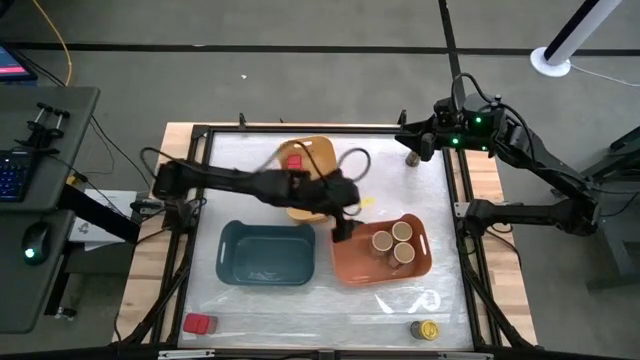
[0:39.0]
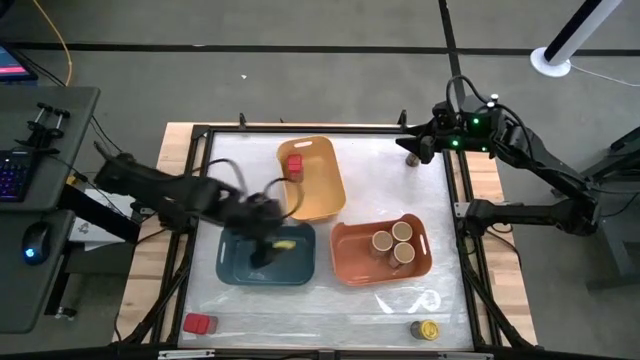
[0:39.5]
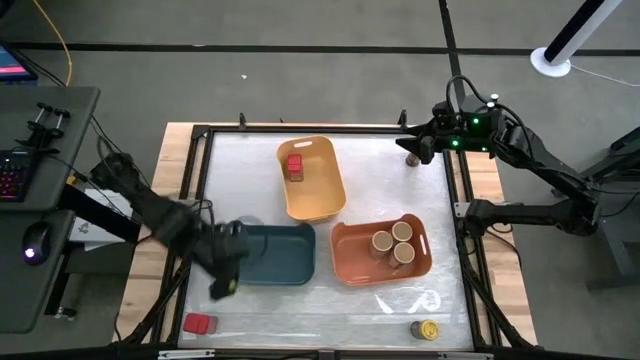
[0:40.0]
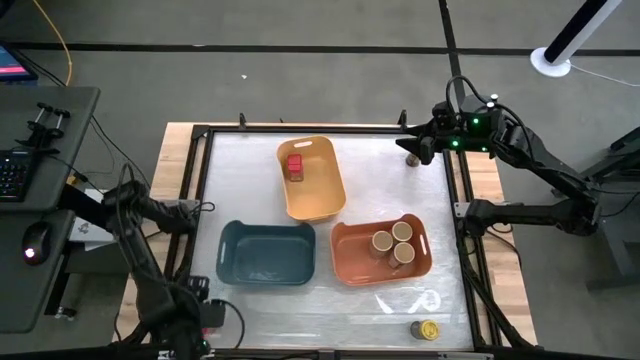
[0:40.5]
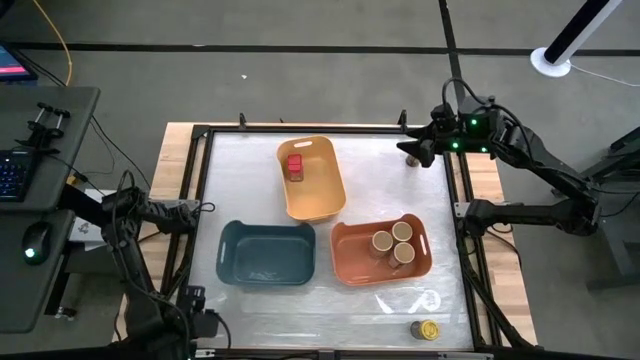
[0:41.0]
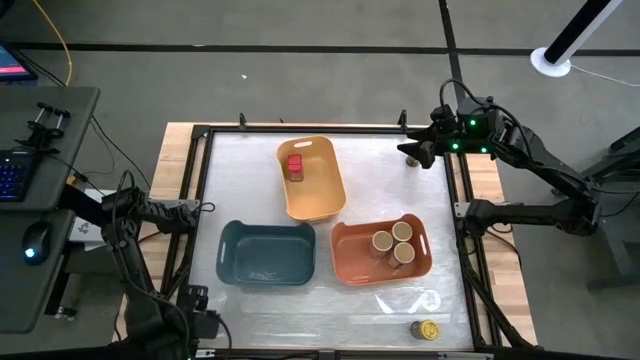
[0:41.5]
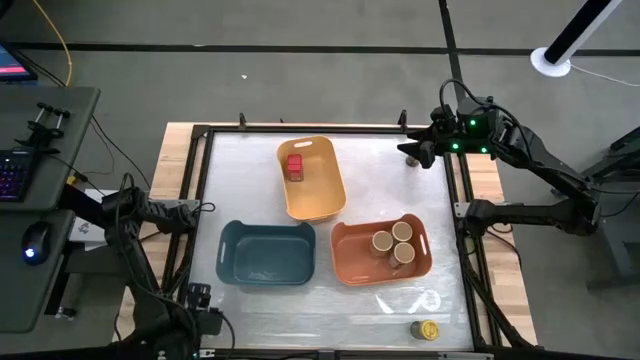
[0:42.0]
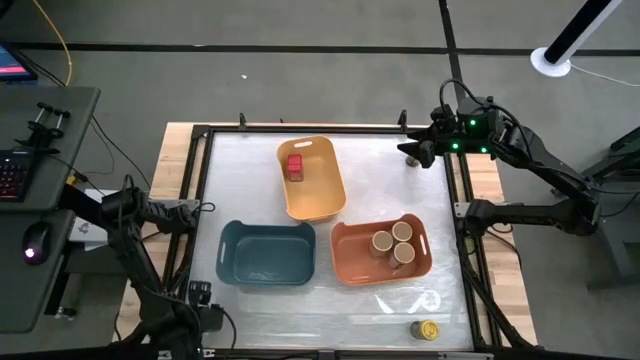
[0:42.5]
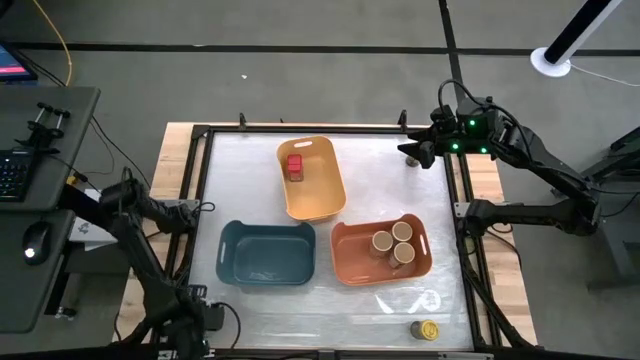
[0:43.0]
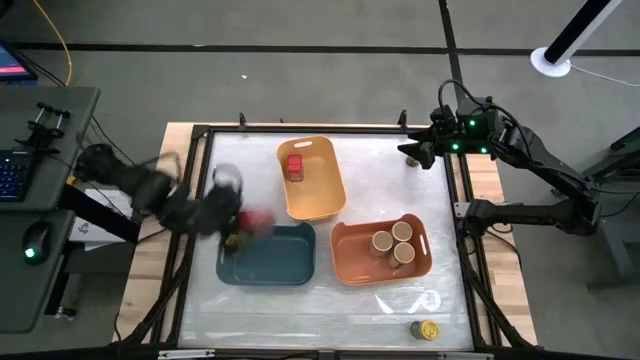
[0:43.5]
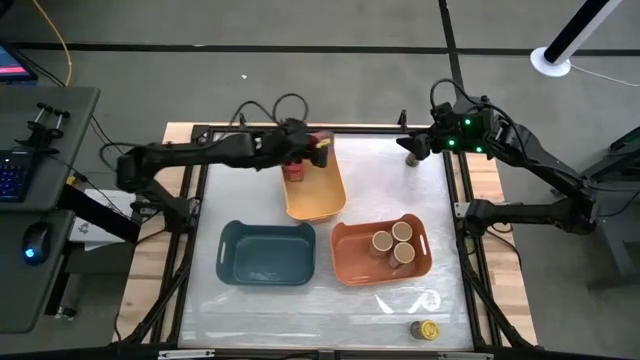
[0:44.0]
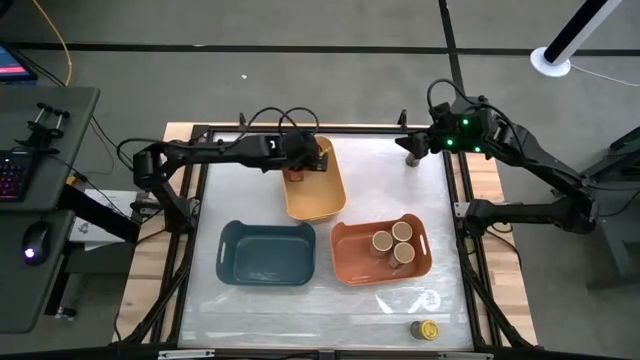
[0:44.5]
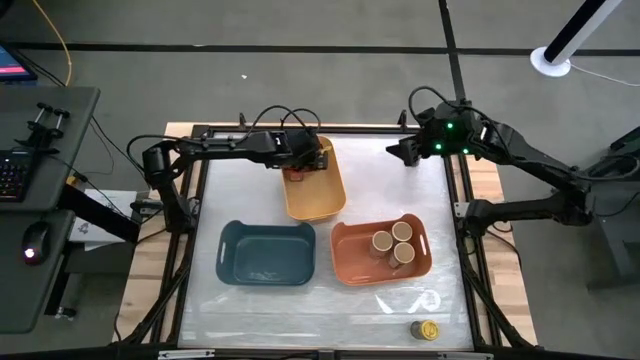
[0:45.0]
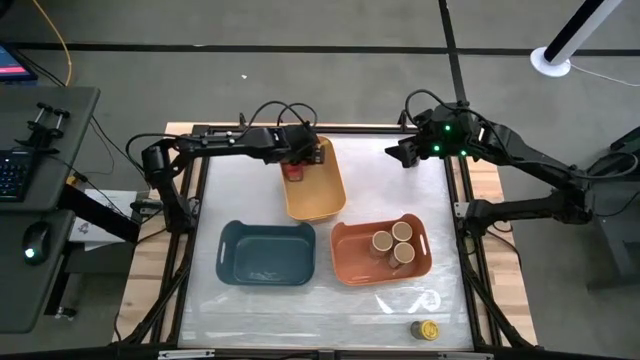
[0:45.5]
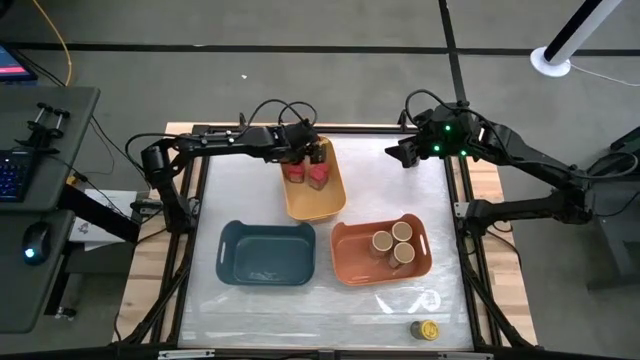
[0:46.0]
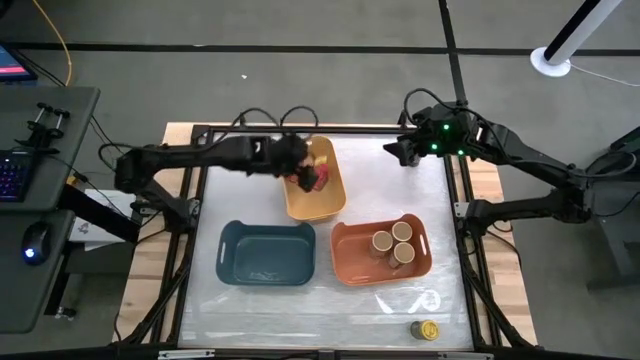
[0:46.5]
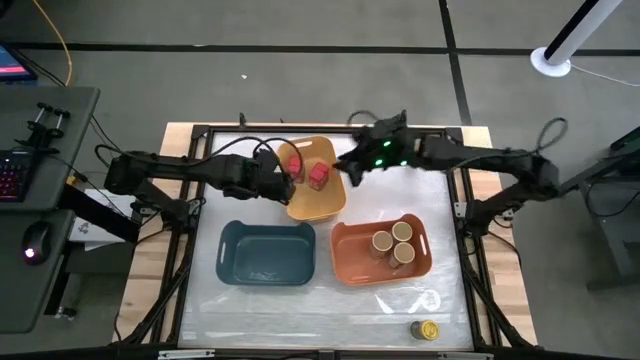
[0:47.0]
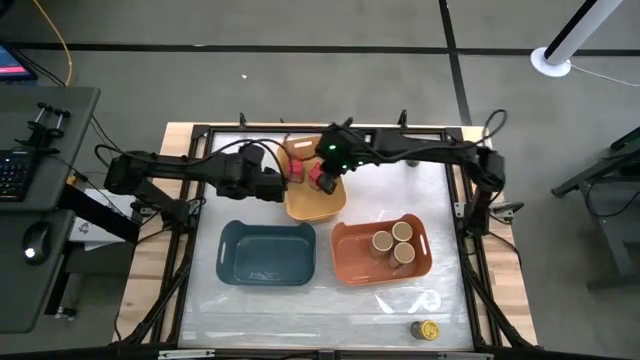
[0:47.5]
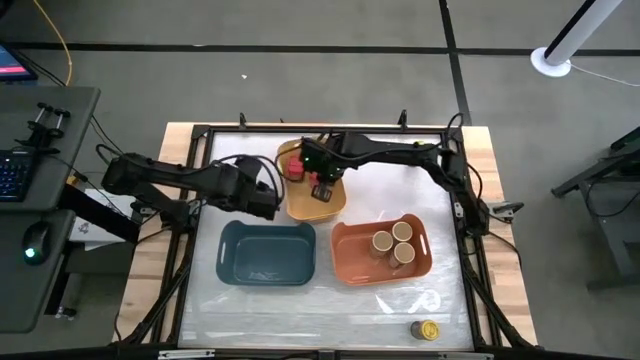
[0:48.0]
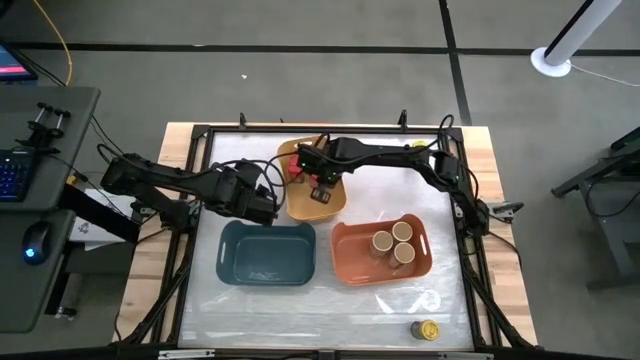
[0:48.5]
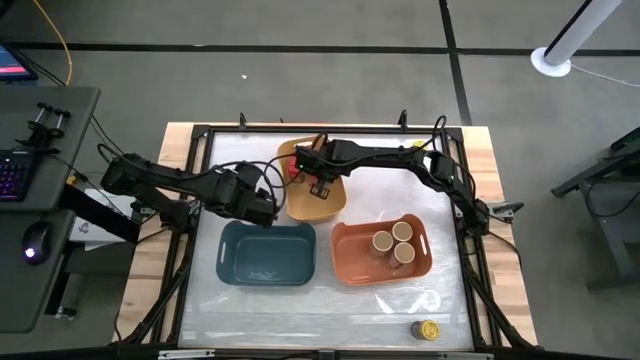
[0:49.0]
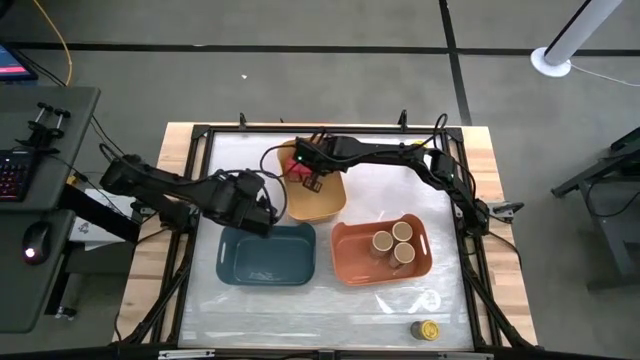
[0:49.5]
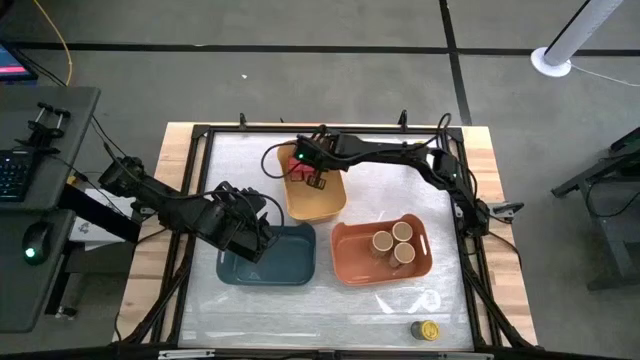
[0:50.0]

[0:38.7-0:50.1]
Task: Sort spices by type
Put the red seasoning can into the yellow bin

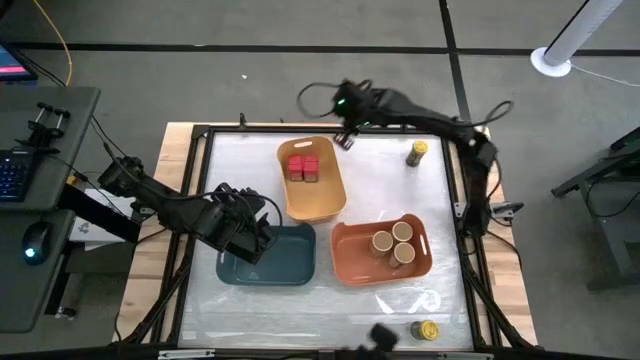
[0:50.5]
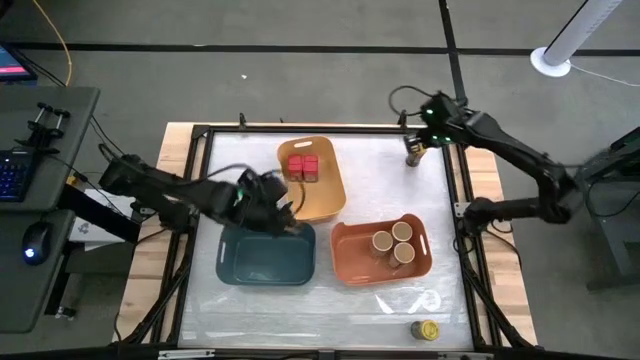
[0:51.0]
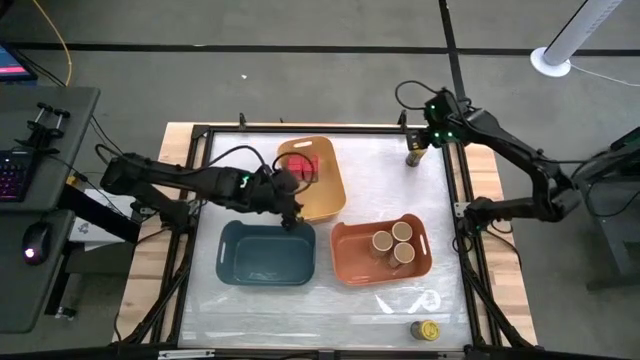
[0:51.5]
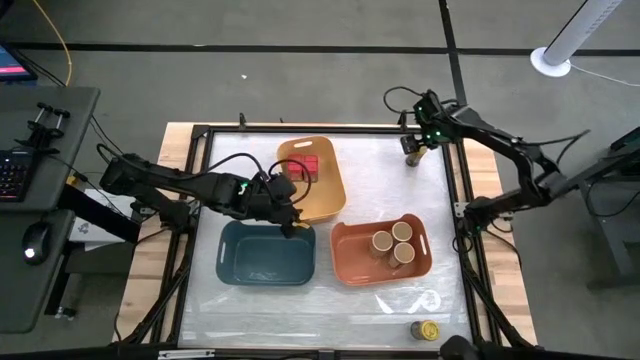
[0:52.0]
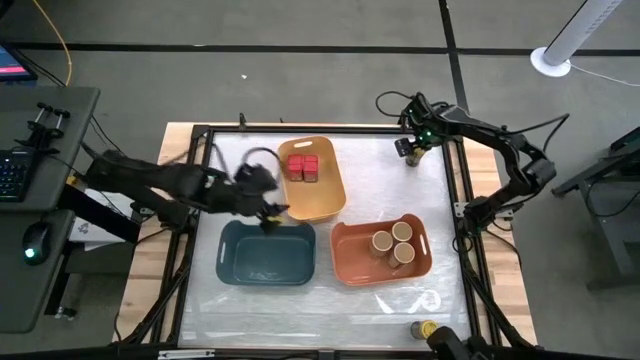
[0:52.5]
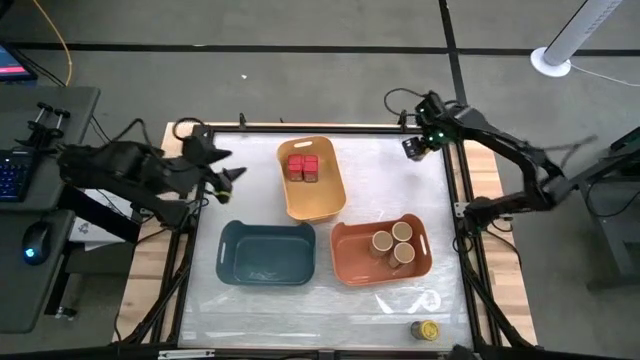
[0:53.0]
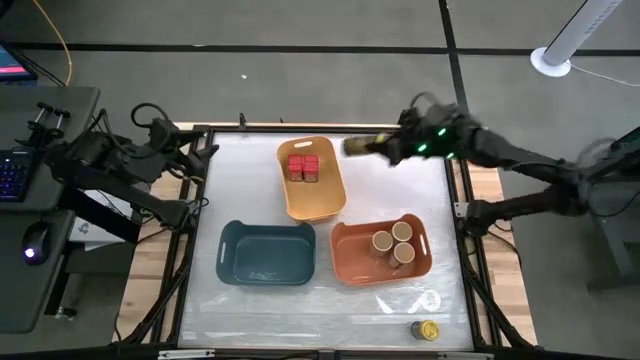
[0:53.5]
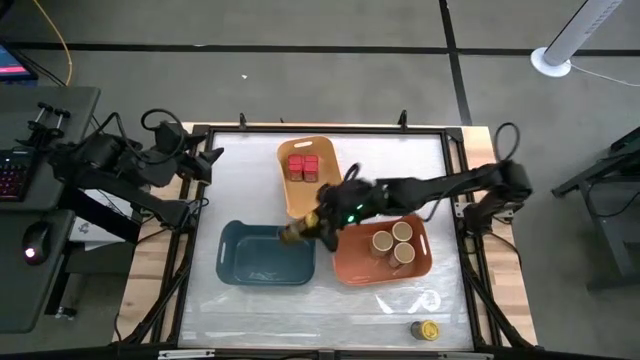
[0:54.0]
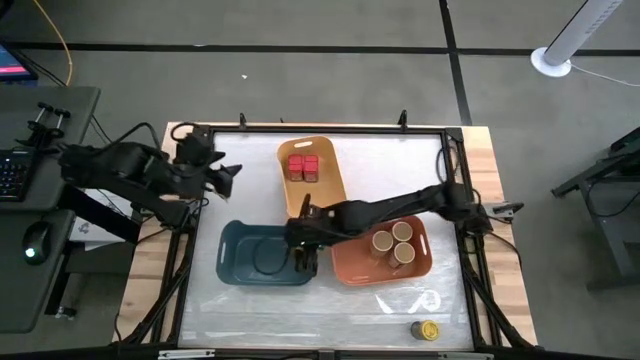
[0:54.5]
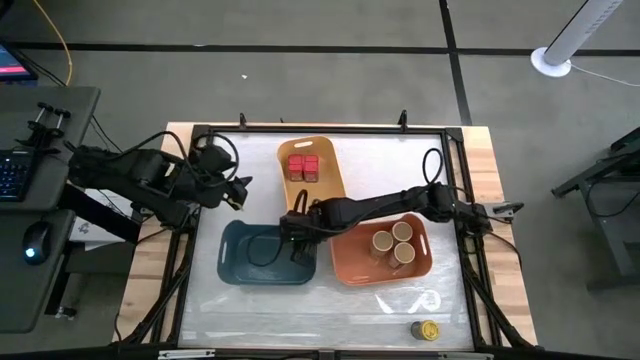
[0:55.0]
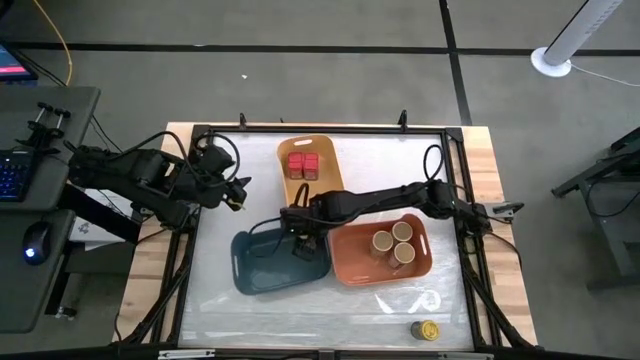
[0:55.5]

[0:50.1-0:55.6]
Put the top yellow seasoning bottle into the blue bin

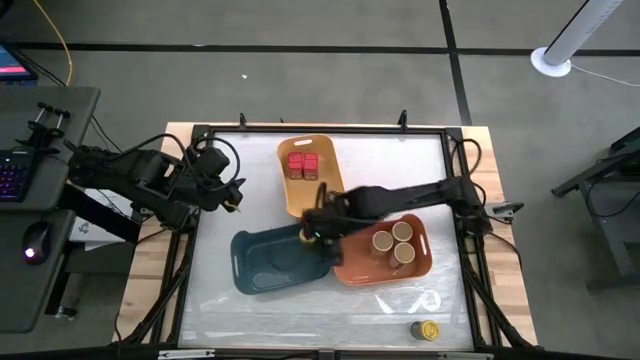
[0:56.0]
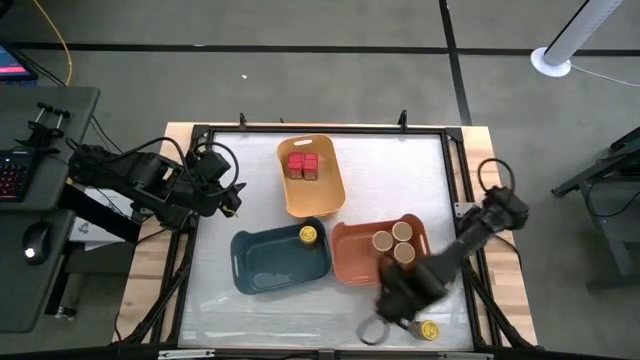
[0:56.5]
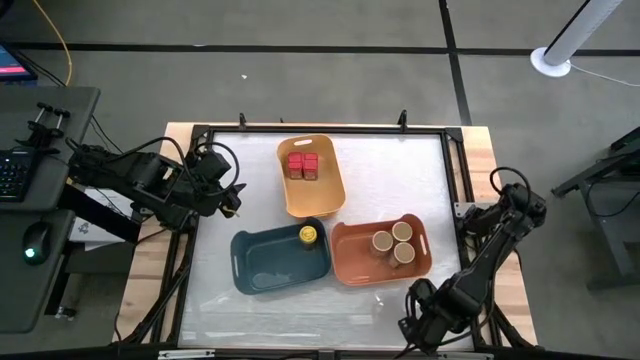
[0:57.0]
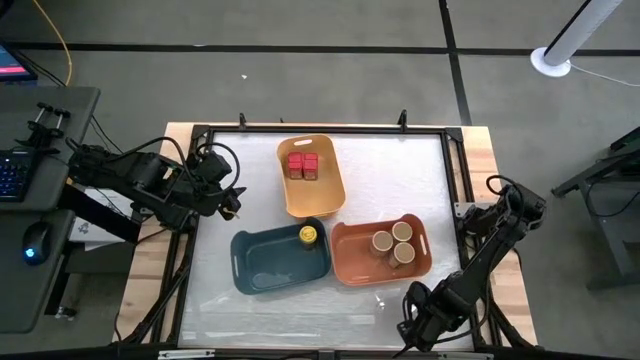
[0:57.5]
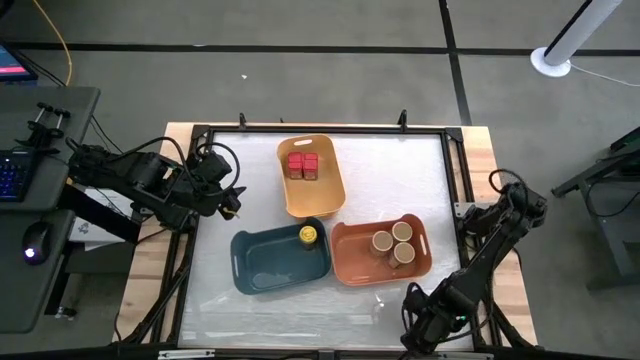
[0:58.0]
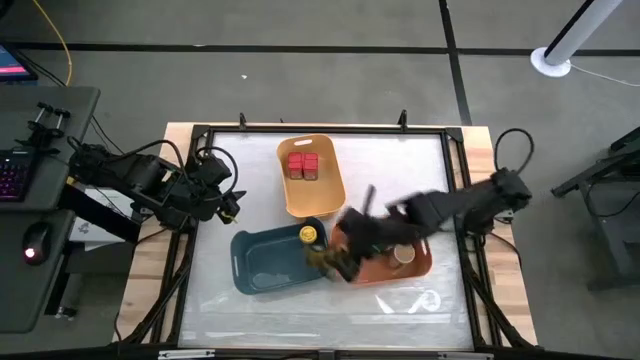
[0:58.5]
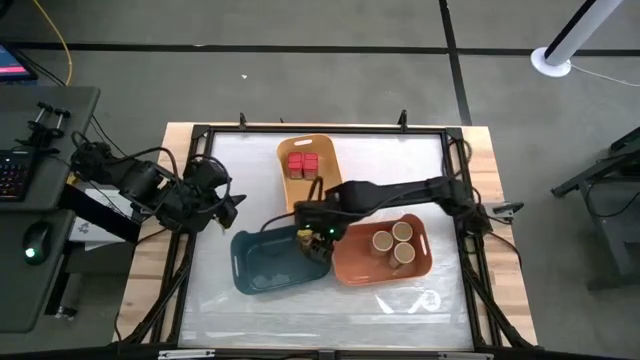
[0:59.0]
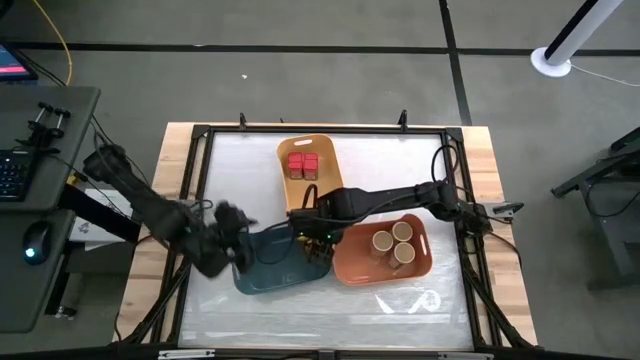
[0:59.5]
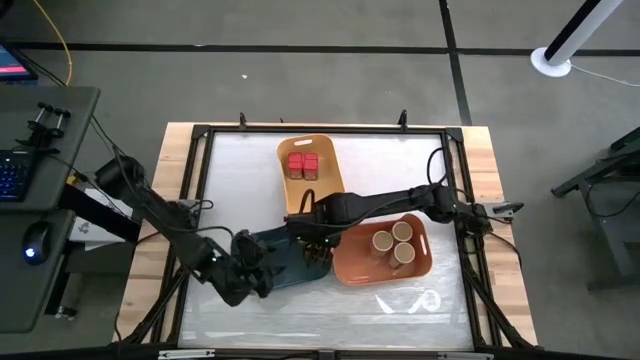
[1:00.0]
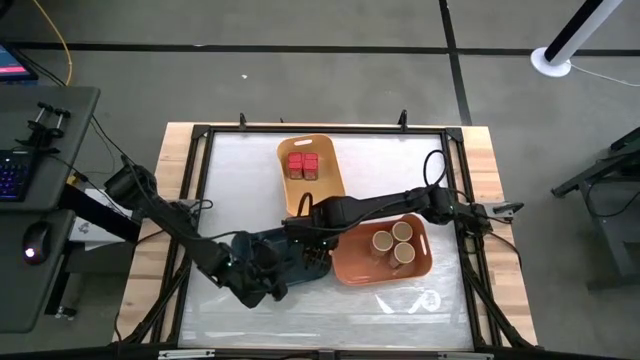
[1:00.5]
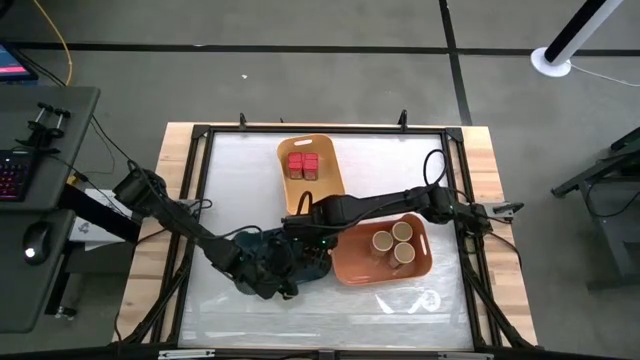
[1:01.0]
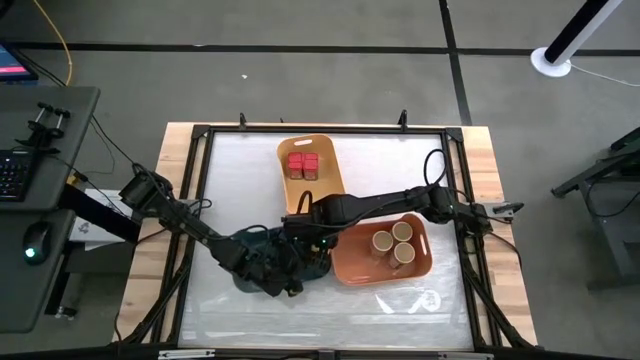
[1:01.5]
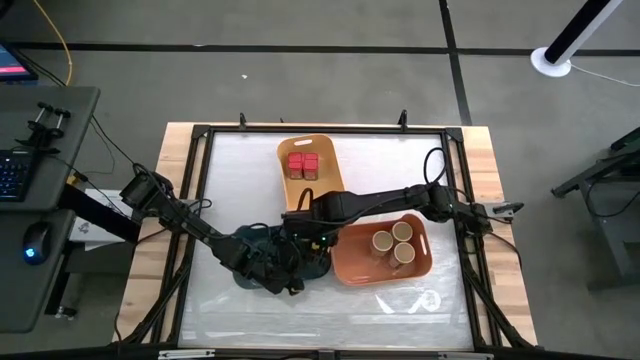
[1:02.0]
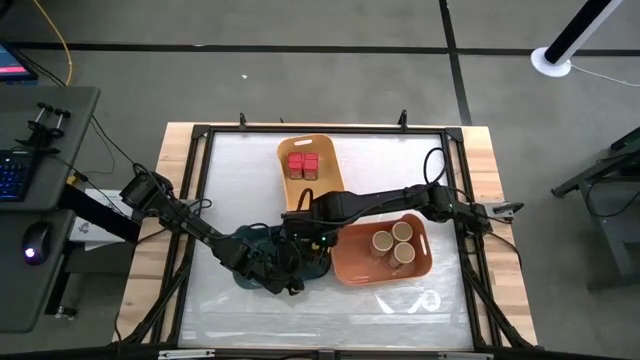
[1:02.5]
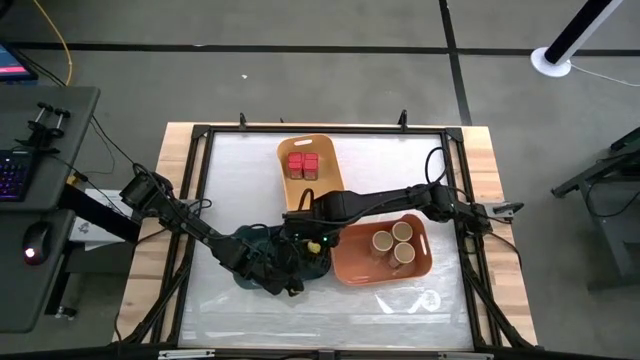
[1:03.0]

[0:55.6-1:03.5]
Put the yellow seasoning bottle into the blue bin
